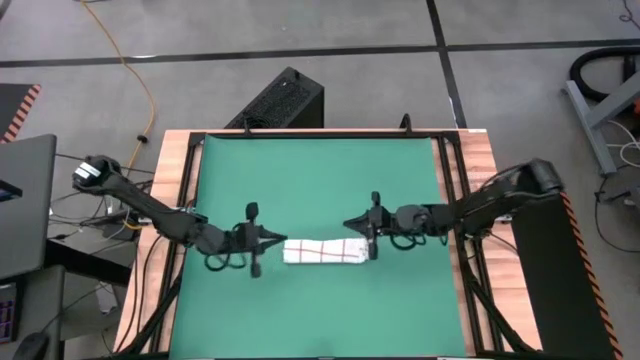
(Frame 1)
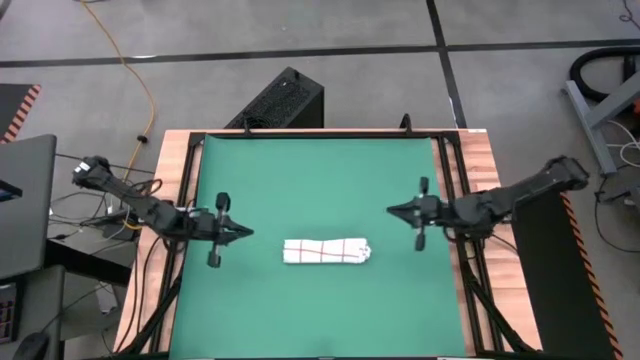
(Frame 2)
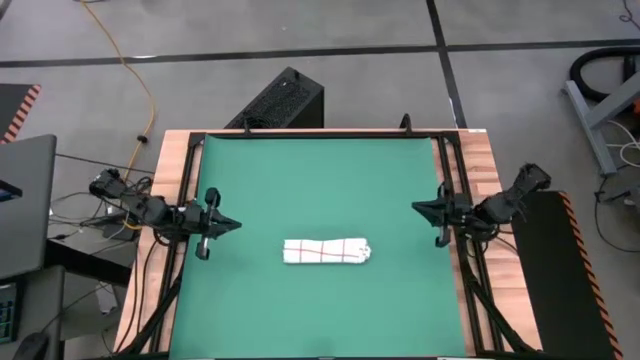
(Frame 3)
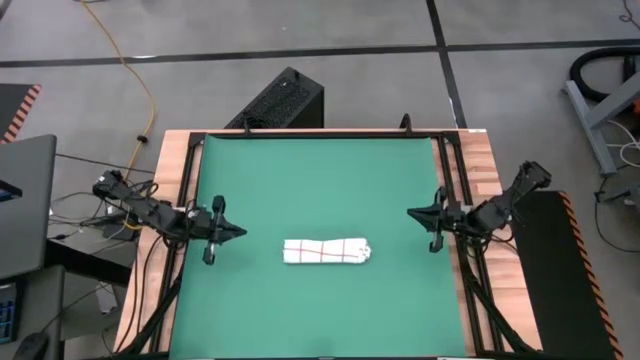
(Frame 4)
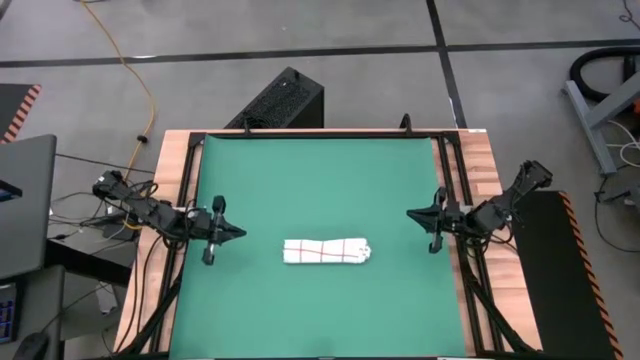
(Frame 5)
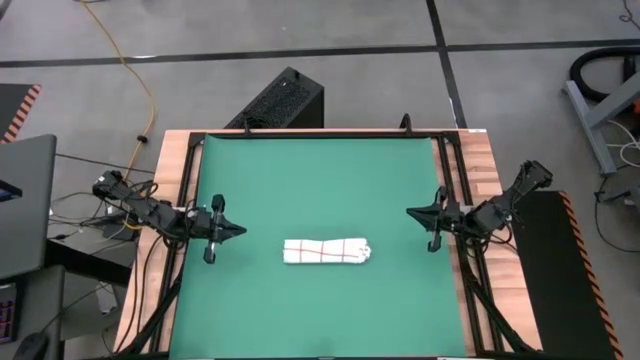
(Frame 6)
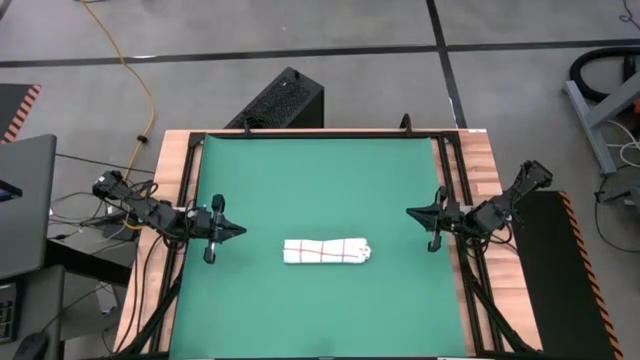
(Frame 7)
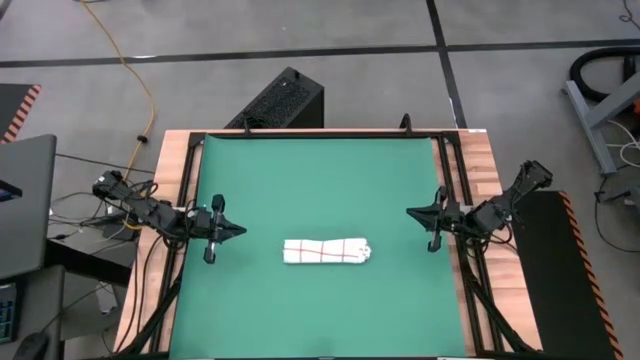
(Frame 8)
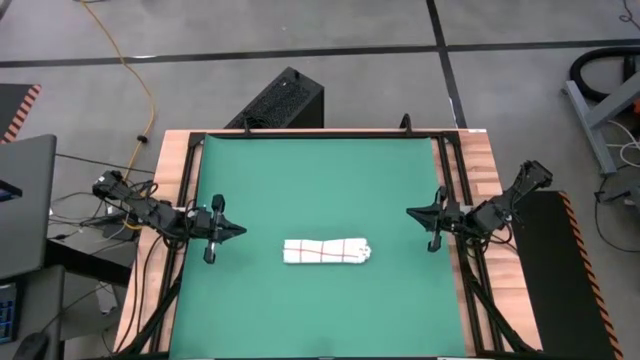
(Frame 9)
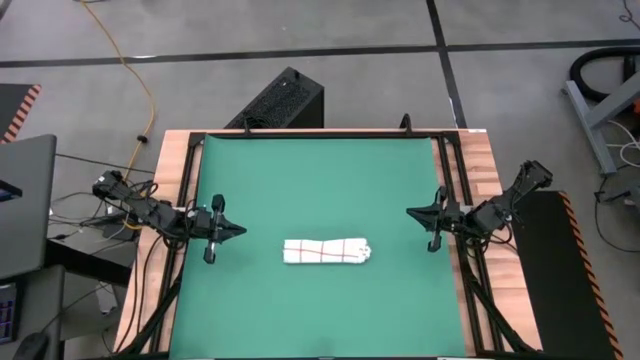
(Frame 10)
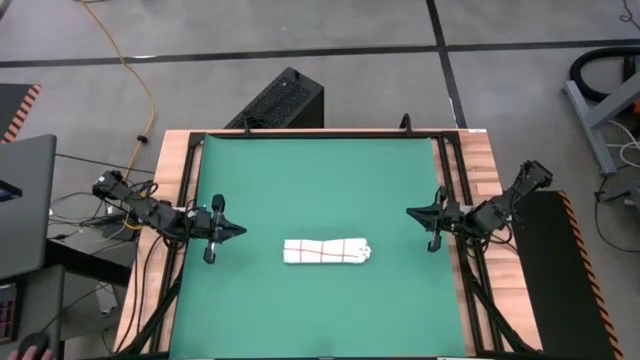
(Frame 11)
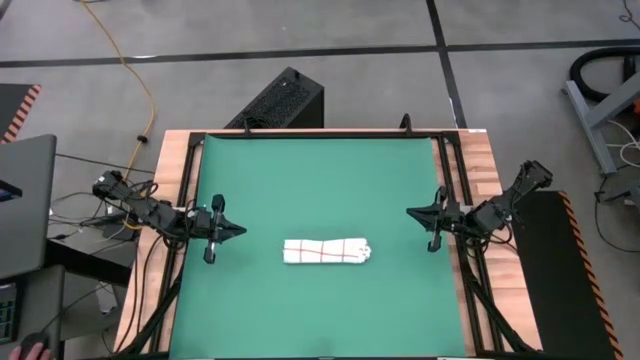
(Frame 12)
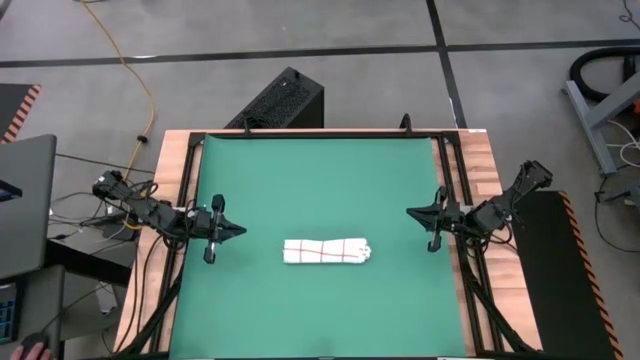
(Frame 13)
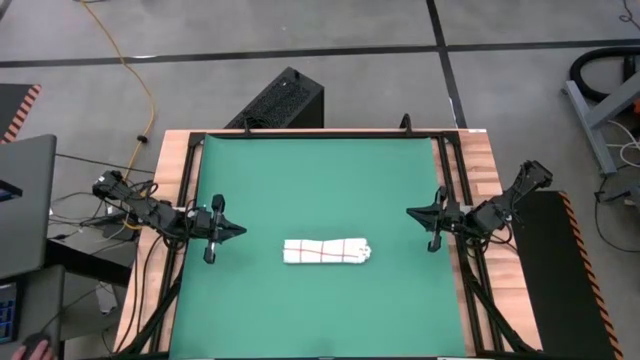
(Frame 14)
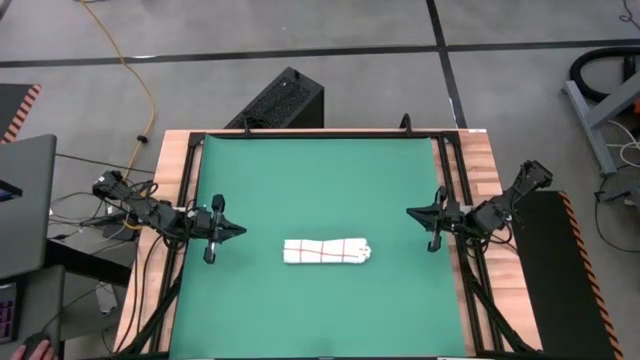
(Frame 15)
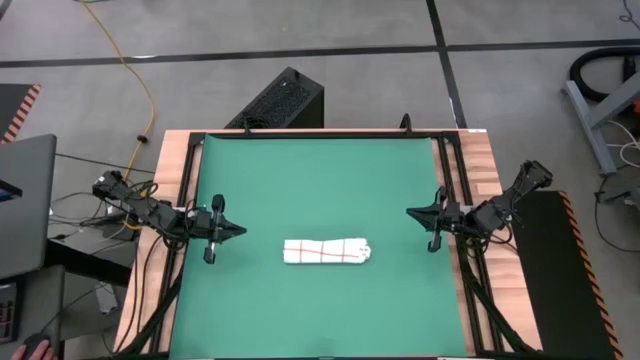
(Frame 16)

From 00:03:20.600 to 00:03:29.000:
Task: Roll towel into tight, uniform cylinder
Return to Home Position

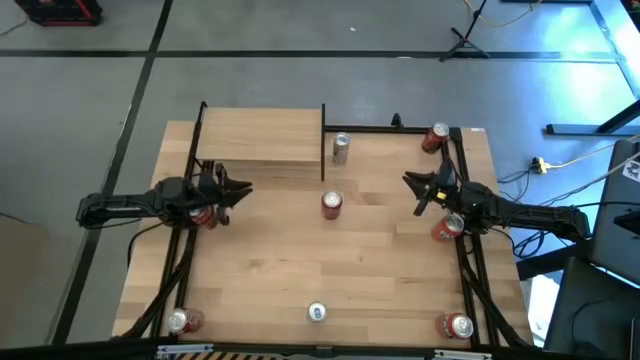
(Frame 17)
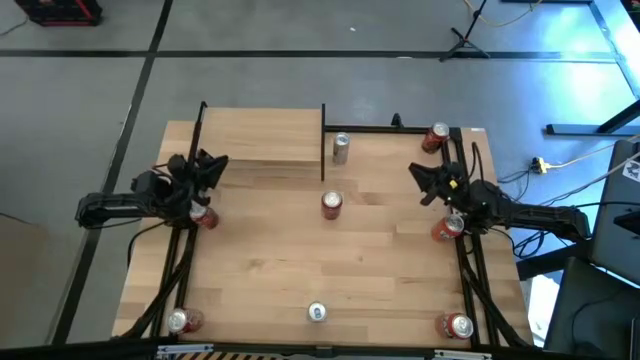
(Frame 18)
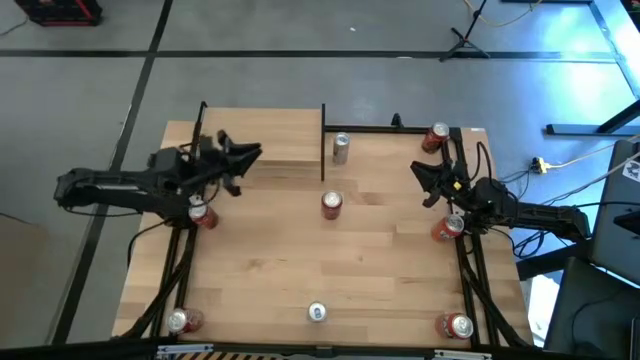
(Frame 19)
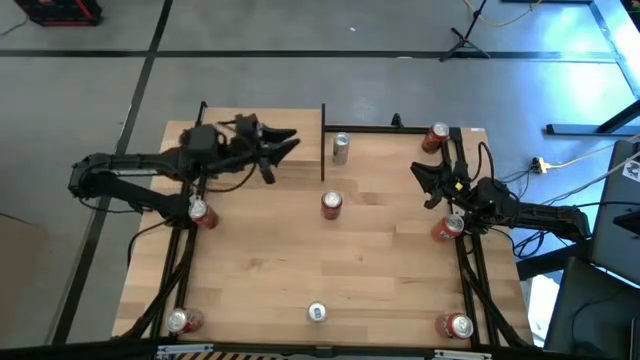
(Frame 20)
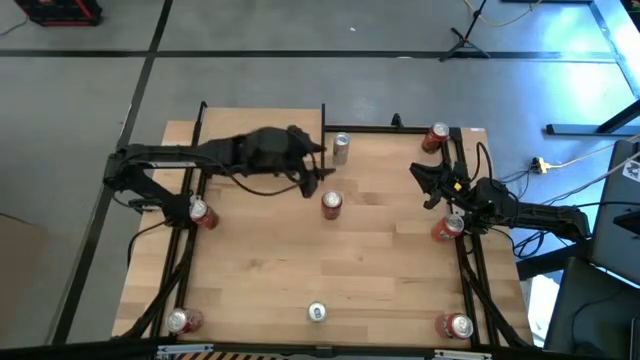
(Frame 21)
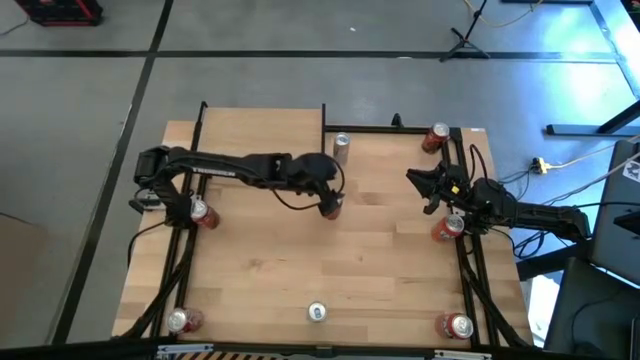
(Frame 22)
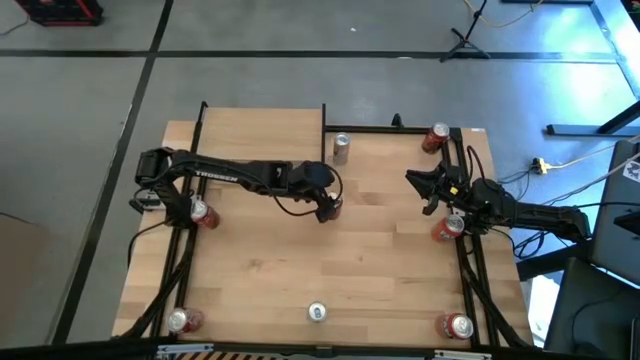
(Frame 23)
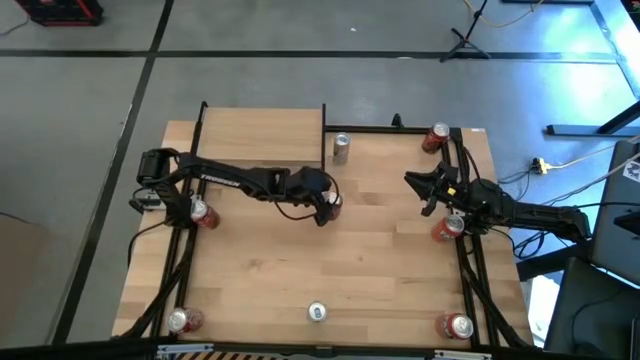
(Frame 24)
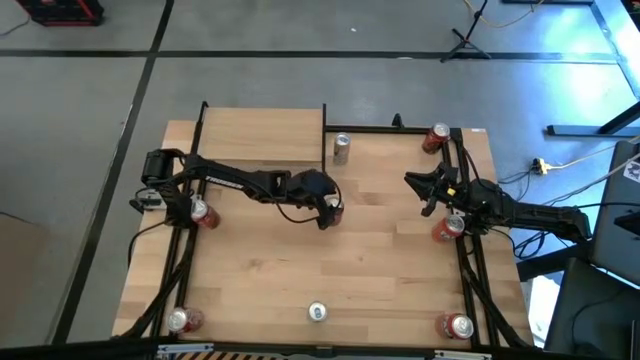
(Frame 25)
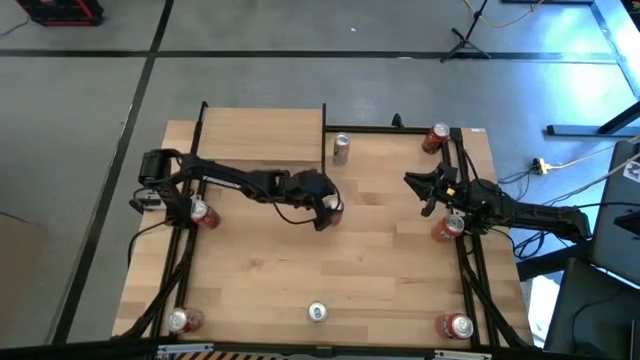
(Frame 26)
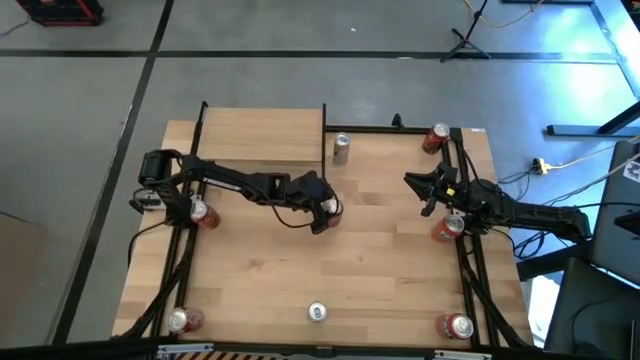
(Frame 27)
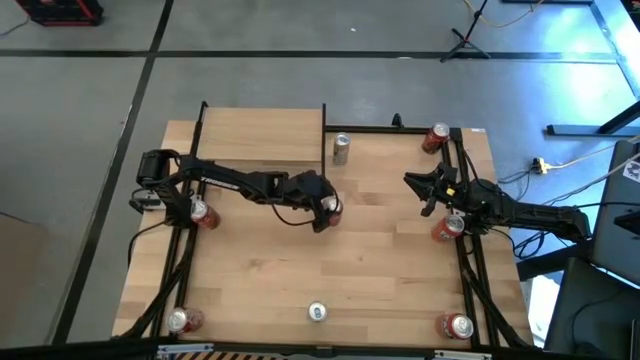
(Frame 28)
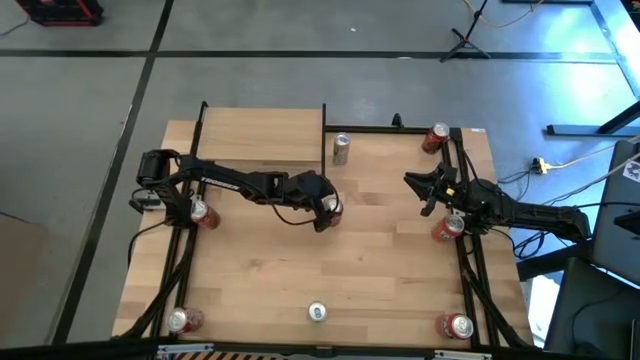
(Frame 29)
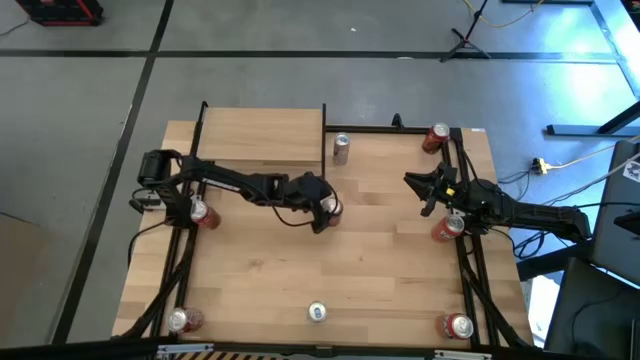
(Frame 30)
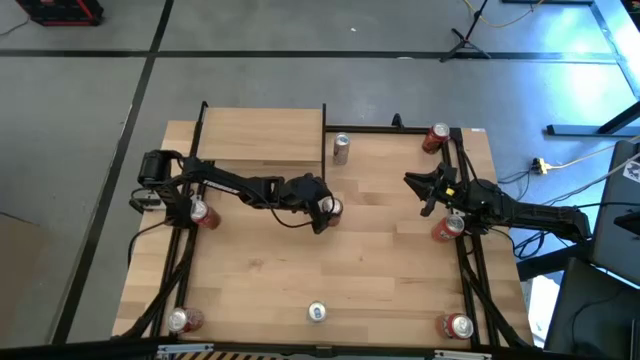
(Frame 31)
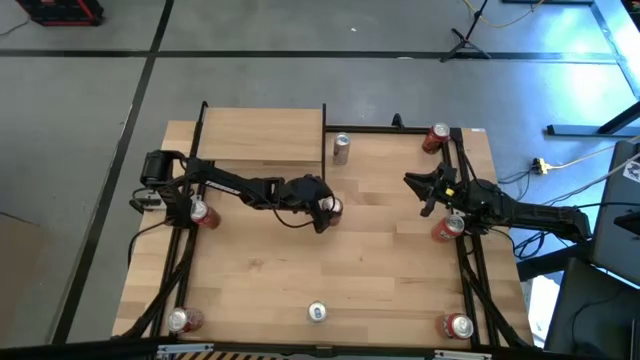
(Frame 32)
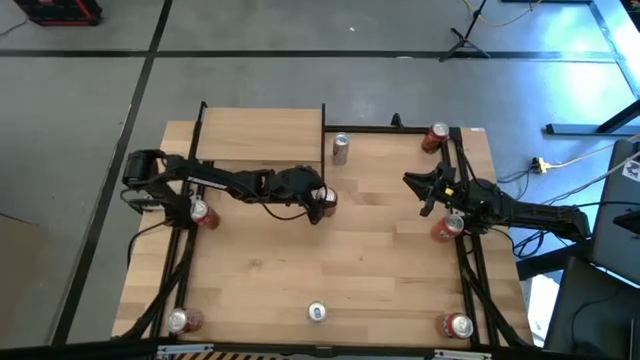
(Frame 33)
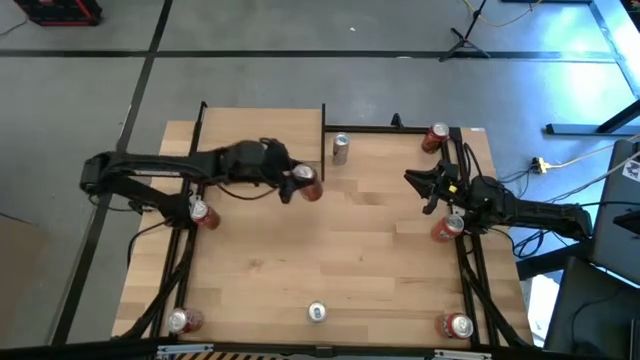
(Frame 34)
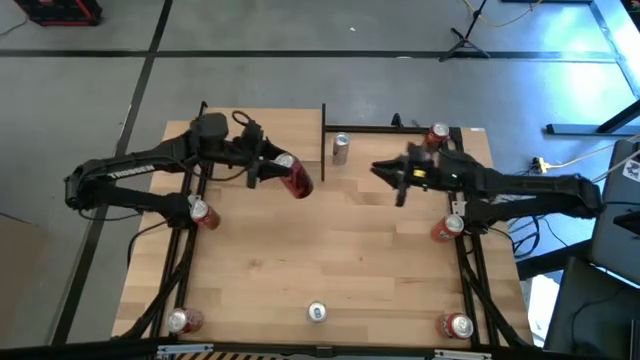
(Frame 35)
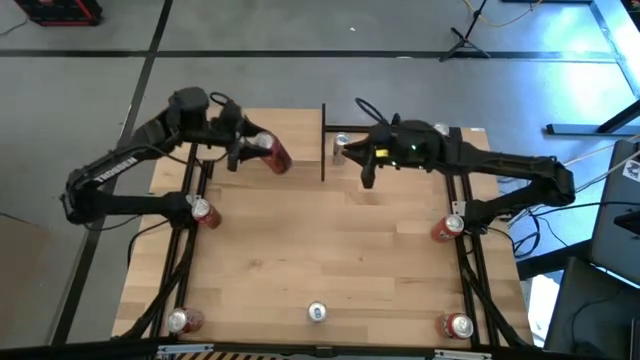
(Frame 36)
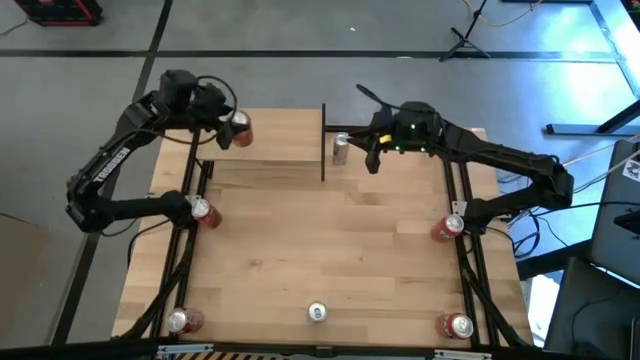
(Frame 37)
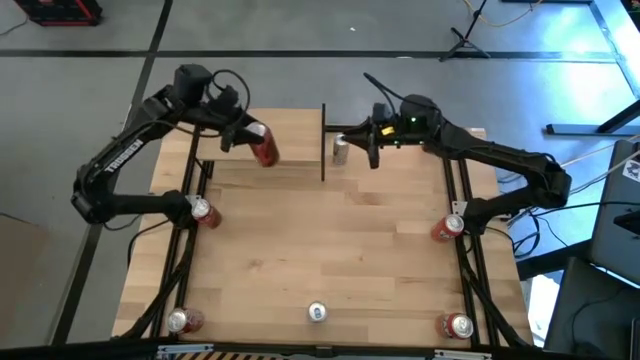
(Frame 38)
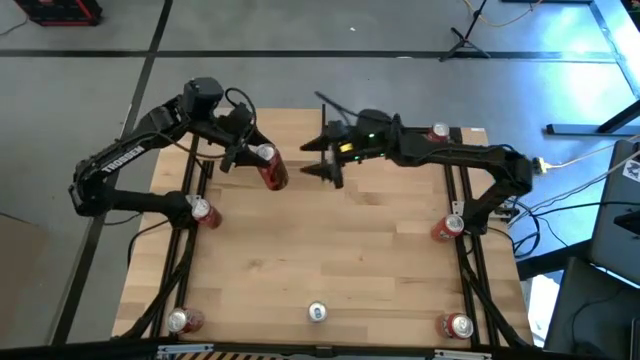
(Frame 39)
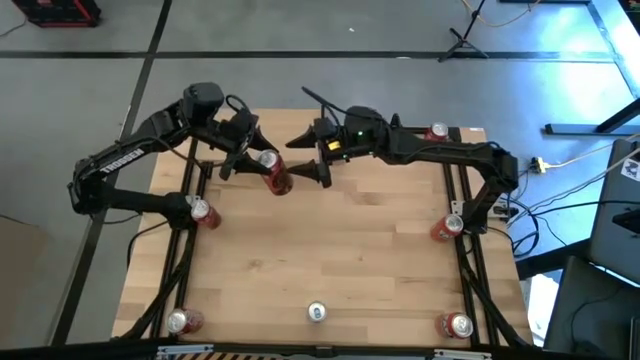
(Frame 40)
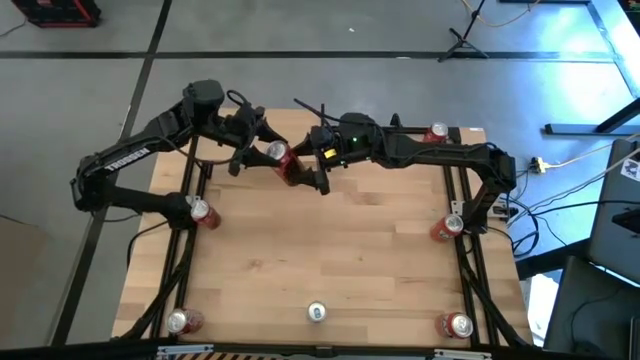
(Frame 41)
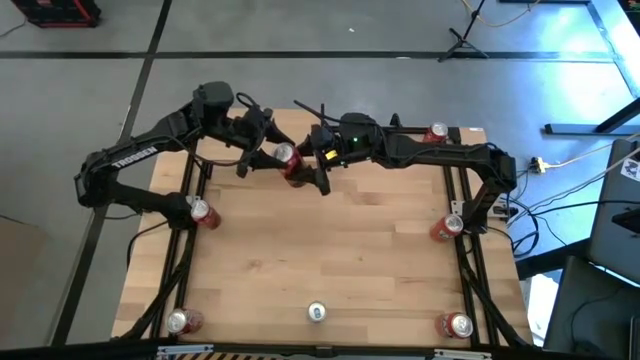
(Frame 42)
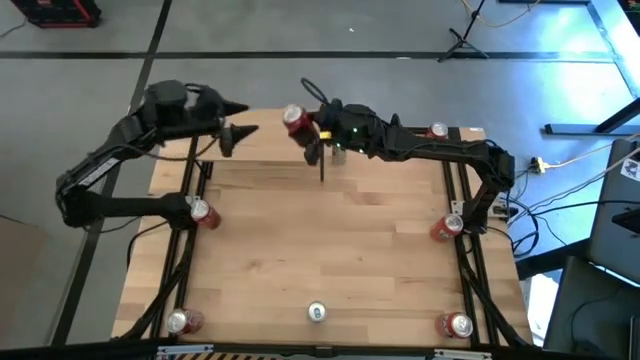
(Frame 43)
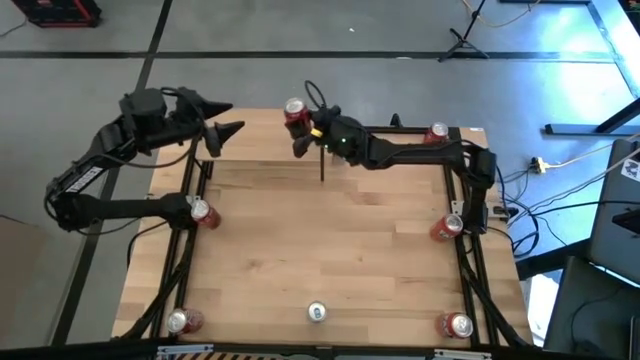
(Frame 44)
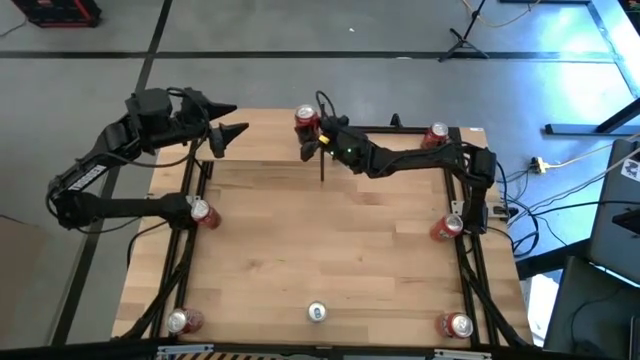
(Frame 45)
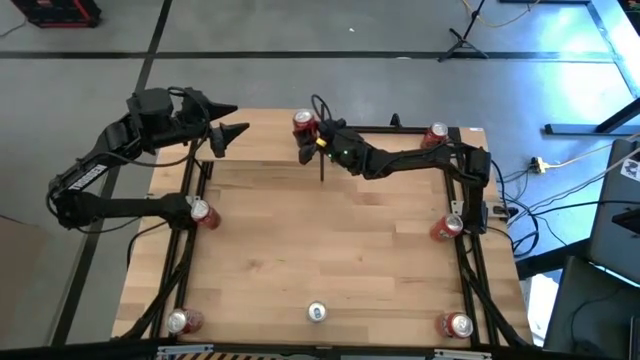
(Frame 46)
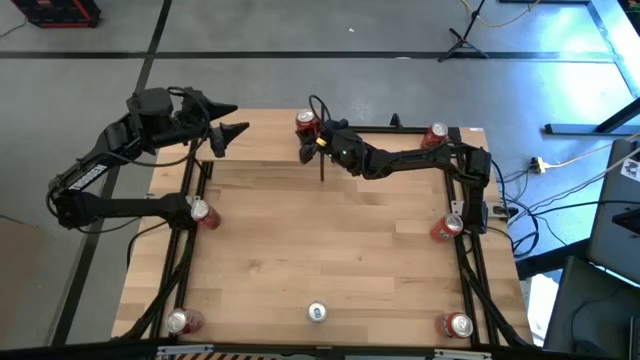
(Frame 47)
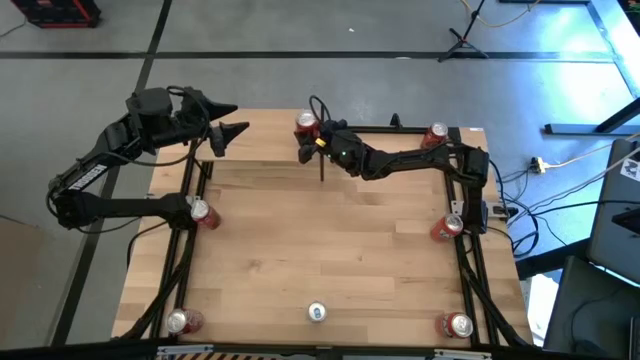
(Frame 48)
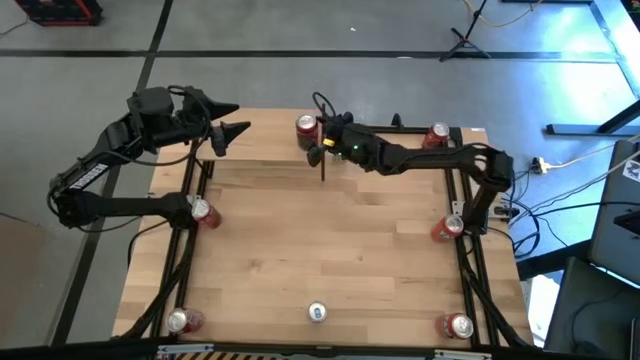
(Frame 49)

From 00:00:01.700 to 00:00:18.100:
Task: Place canned beverage on shelf
Put the bottom red-black soda can on the shelf
